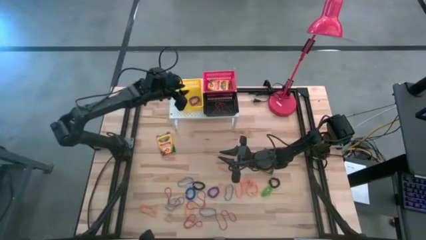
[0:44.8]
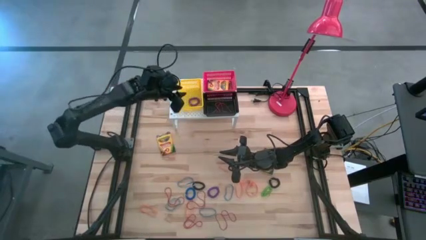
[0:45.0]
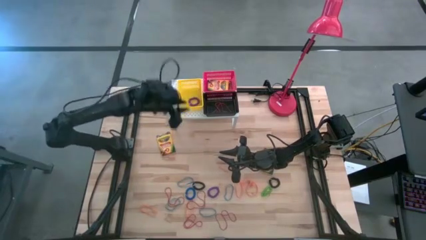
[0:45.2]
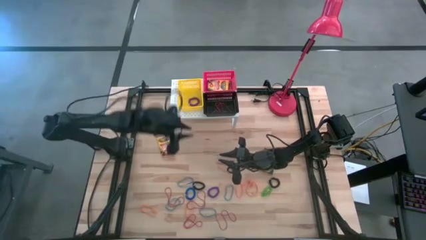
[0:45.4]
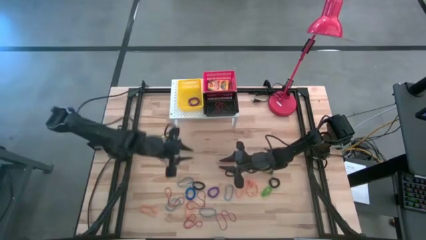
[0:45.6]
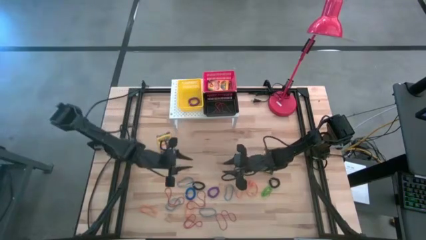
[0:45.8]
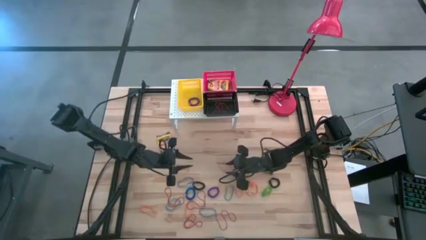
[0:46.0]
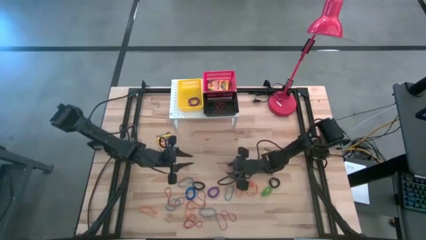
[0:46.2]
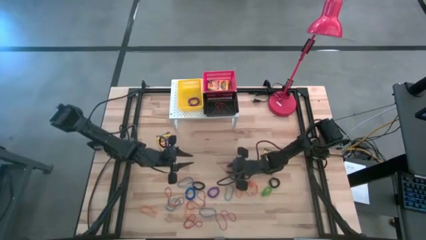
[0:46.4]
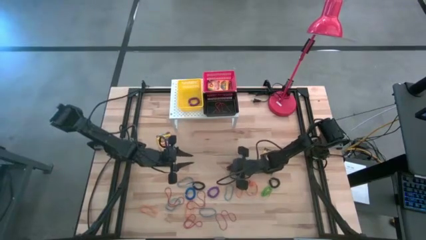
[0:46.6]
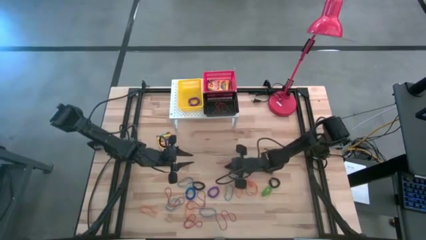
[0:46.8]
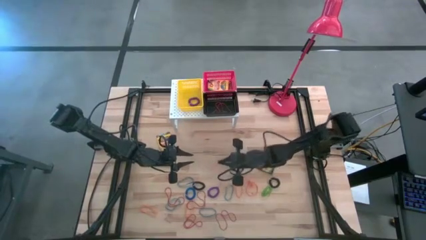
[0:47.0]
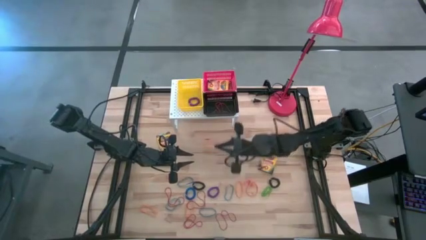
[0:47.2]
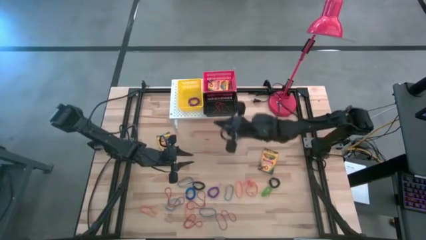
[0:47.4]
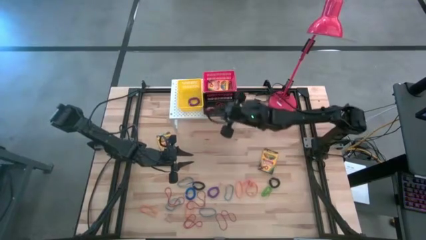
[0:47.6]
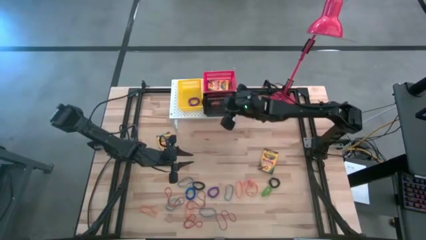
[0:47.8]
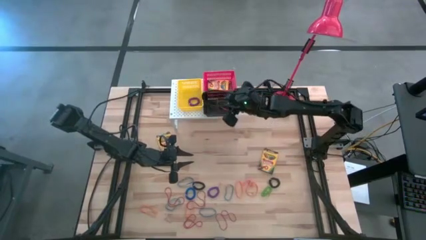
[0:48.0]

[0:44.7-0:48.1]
Task: Pick & Place Office Desk Supplies
Put the orange rubber band into the black bin on the shelf

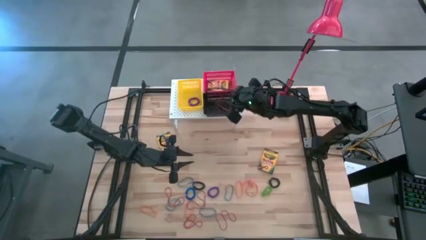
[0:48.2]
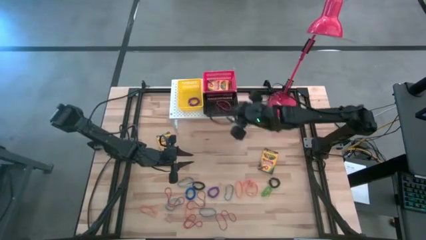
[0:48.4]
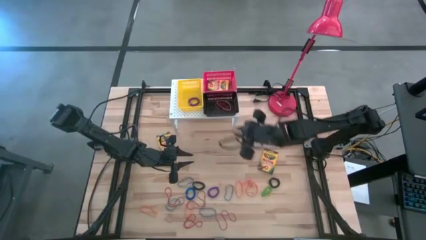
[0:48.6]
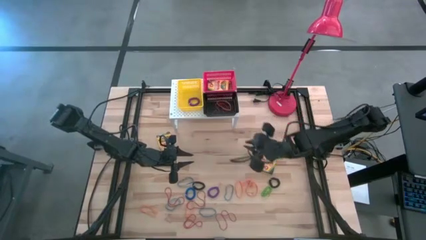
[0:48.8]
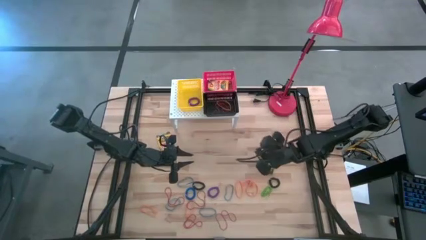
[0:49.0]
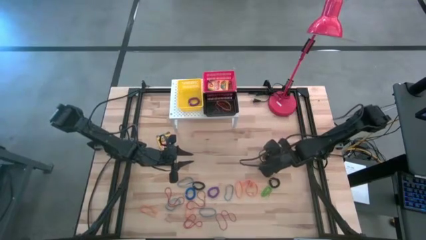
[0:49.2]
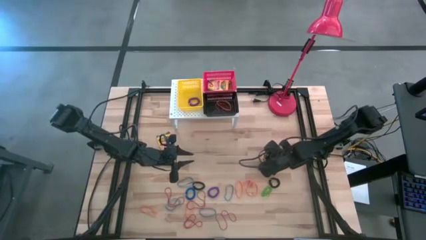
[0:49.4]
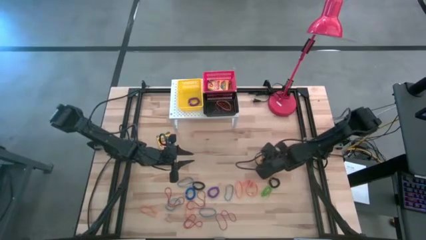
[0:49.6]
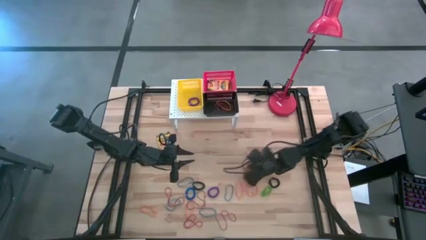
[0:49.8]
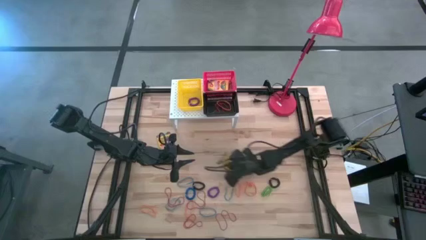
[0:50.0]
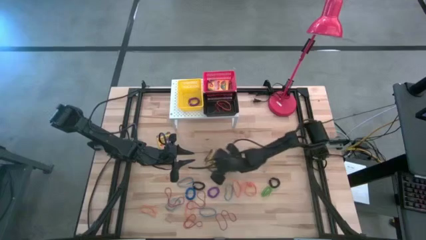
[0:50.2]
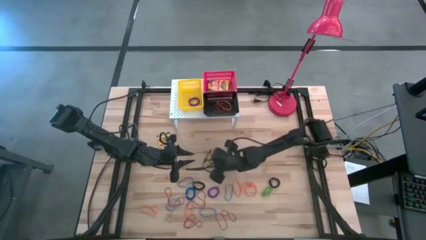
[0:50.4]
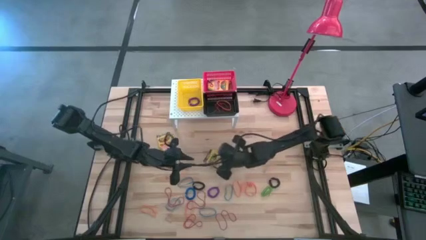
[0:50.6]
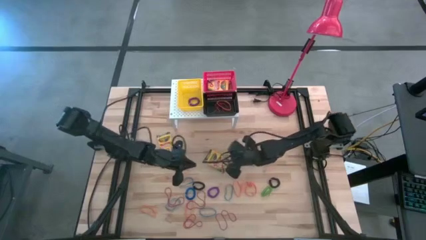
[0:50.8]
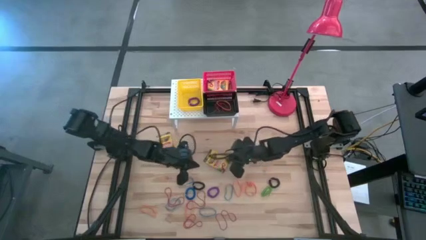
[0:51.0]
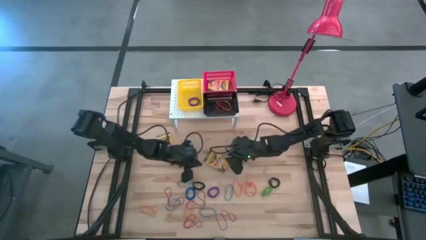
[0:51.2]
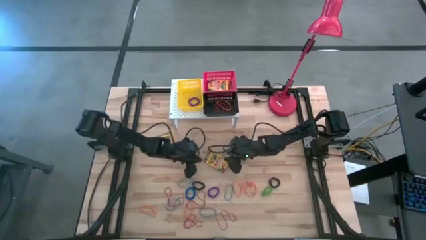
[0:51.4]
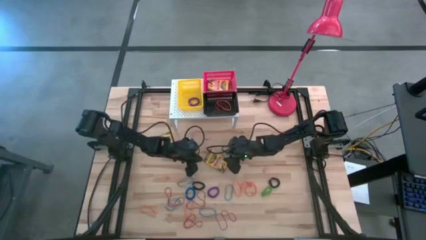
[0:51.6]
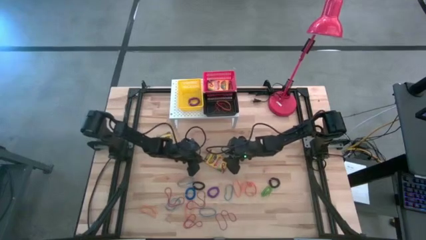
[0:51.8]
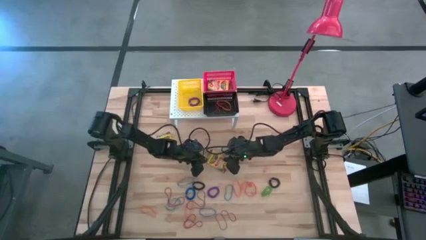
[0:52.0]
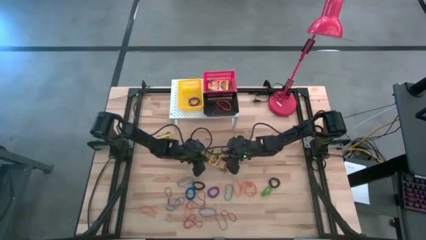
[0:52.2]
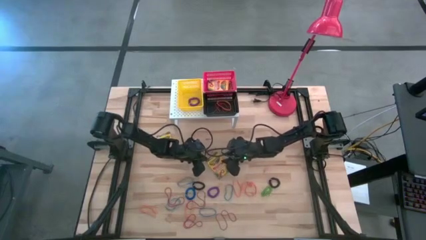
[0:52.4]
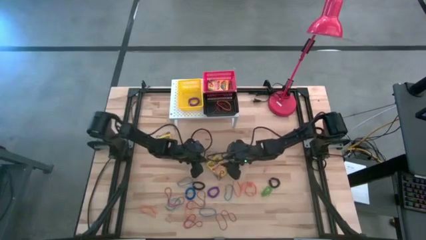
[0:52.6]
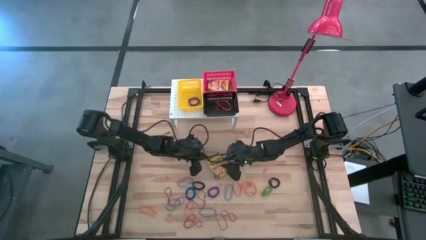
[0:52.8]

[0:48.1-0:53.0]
Put the yellow crayon box into the red bin on the shelf

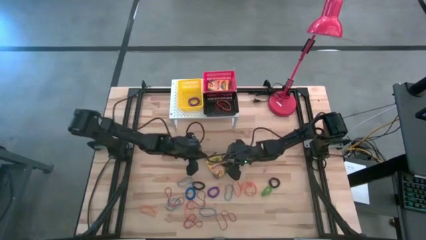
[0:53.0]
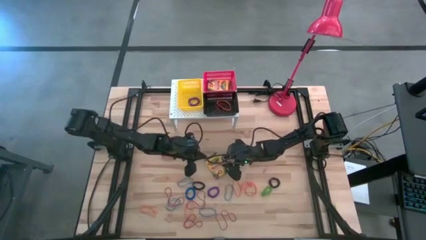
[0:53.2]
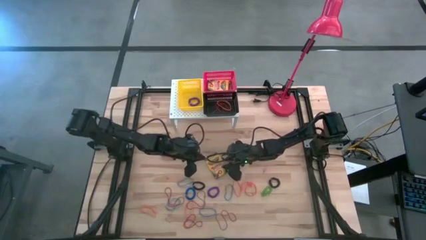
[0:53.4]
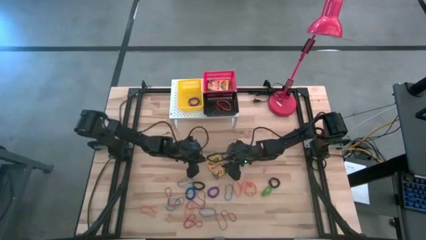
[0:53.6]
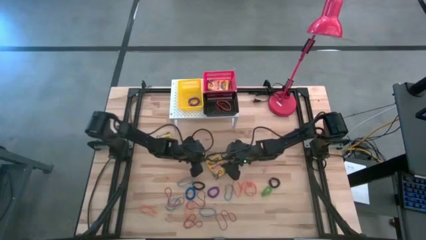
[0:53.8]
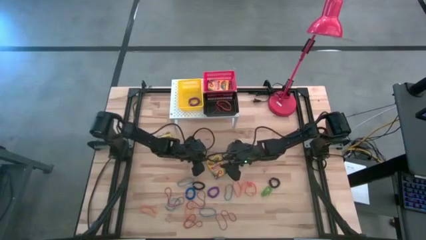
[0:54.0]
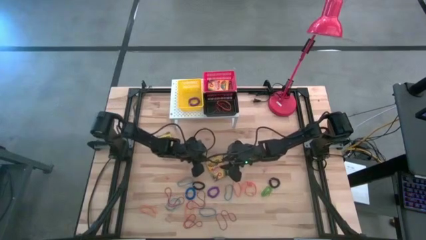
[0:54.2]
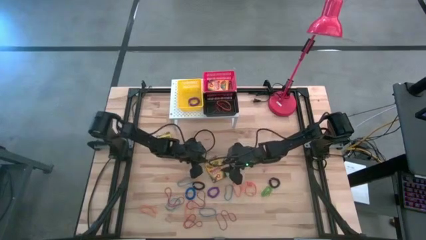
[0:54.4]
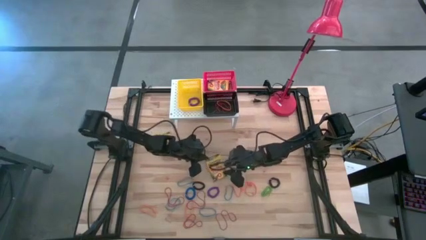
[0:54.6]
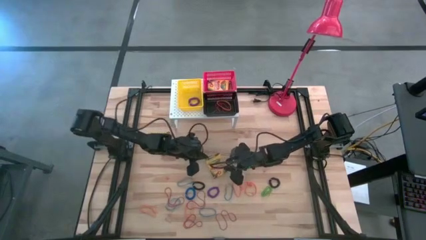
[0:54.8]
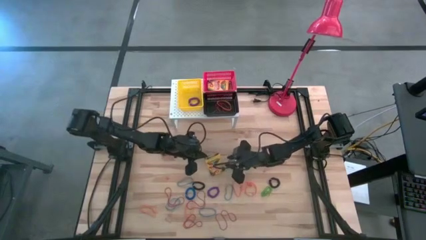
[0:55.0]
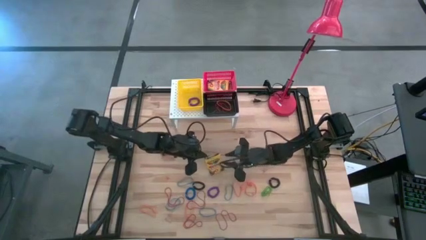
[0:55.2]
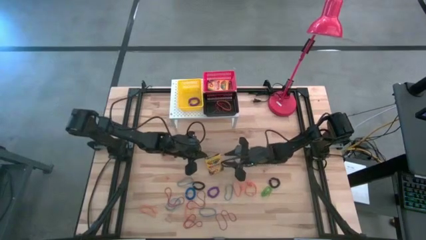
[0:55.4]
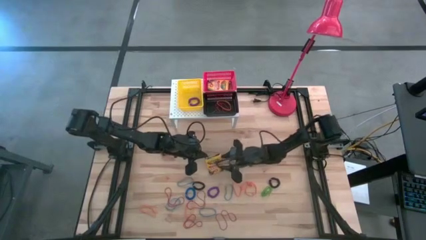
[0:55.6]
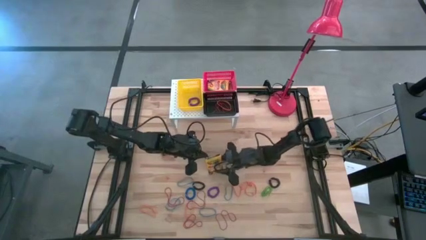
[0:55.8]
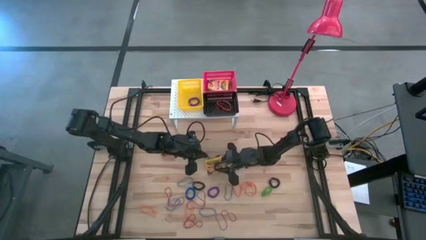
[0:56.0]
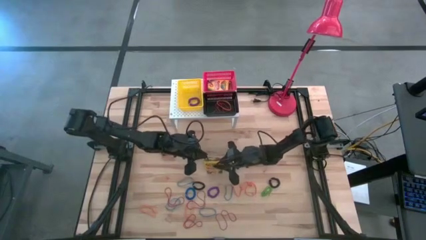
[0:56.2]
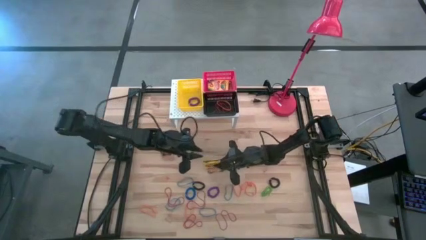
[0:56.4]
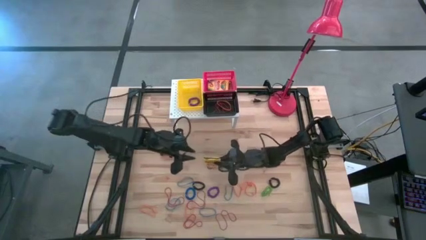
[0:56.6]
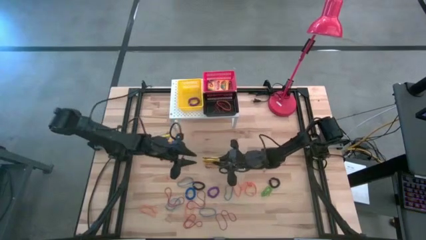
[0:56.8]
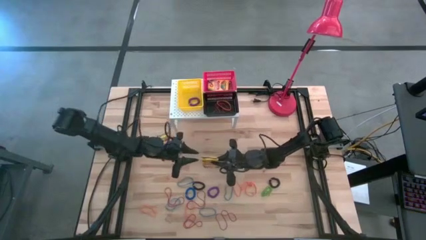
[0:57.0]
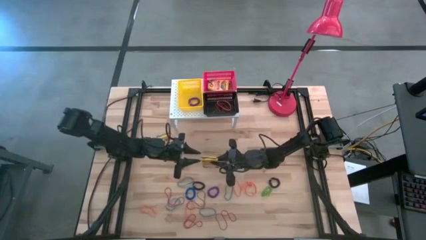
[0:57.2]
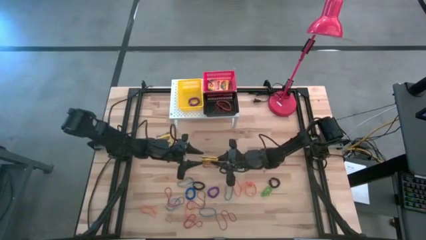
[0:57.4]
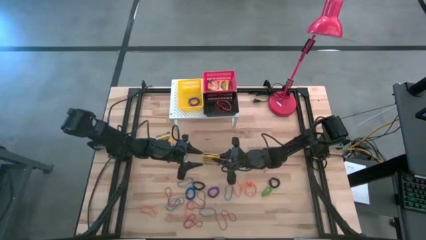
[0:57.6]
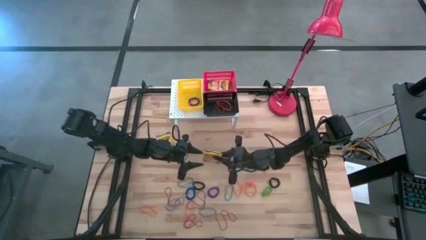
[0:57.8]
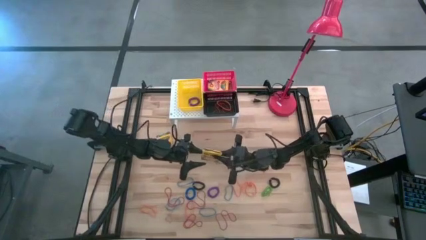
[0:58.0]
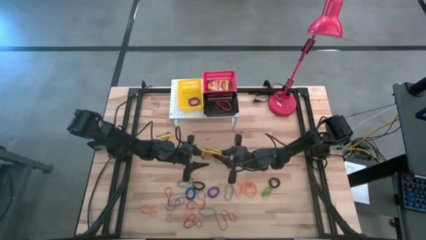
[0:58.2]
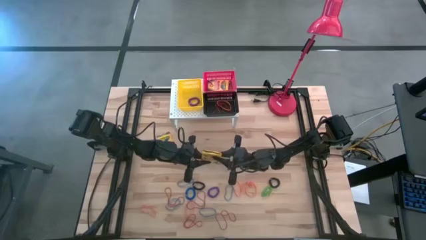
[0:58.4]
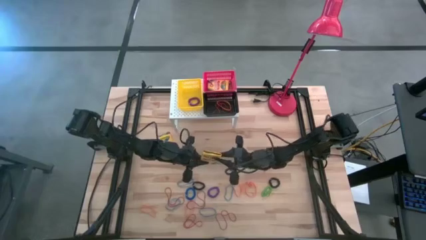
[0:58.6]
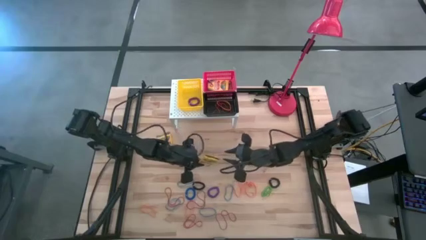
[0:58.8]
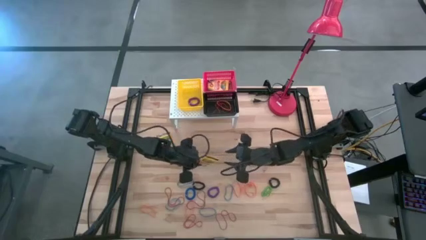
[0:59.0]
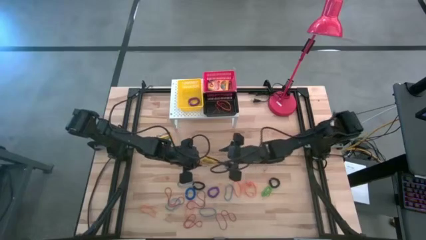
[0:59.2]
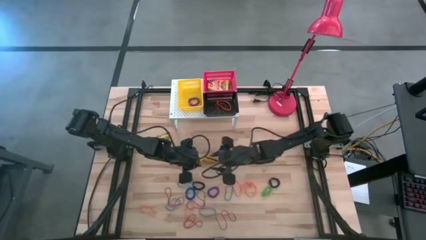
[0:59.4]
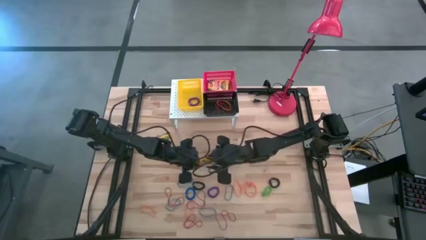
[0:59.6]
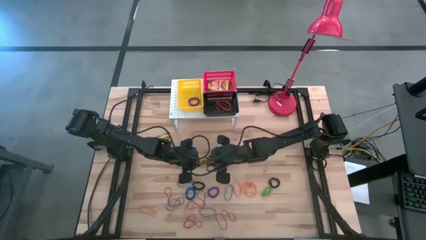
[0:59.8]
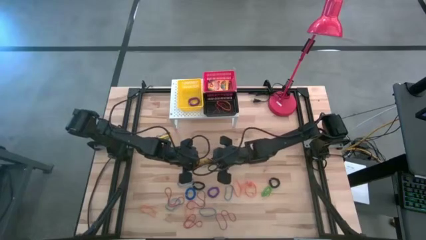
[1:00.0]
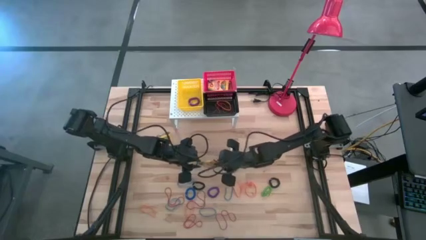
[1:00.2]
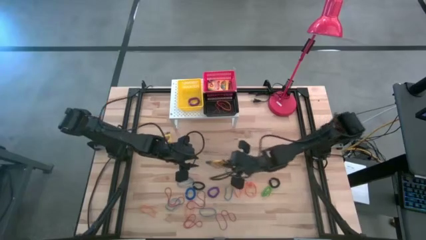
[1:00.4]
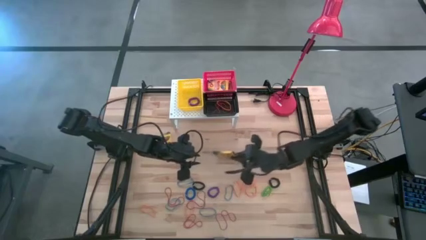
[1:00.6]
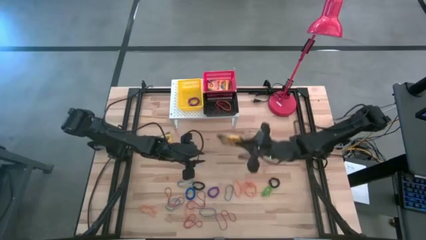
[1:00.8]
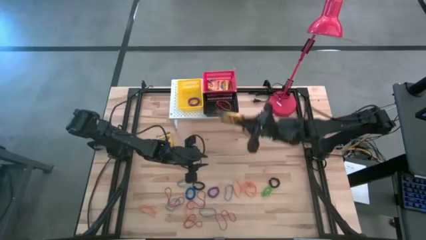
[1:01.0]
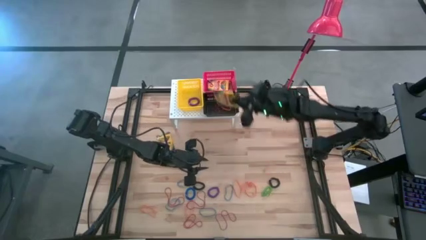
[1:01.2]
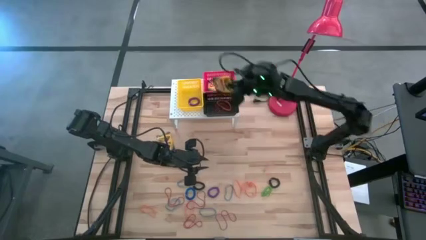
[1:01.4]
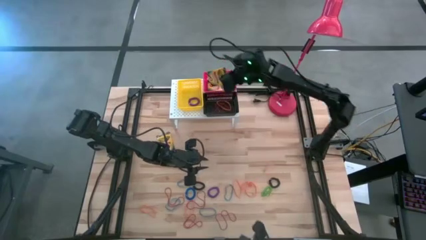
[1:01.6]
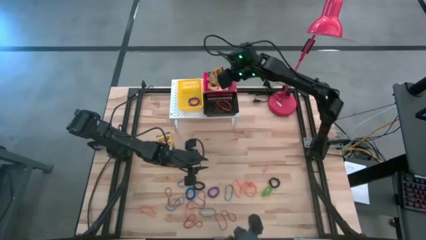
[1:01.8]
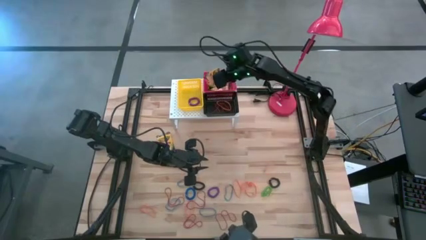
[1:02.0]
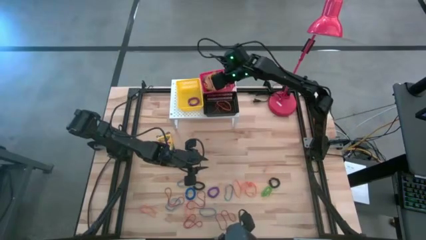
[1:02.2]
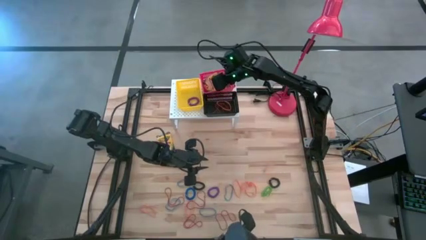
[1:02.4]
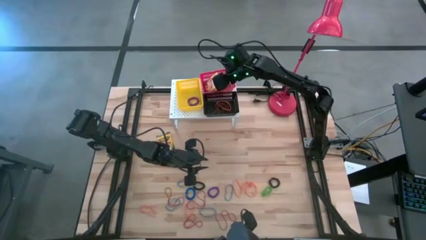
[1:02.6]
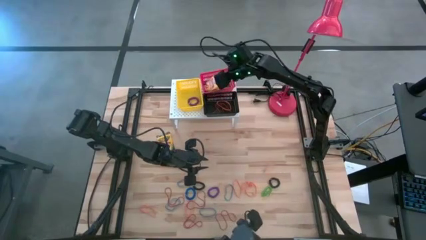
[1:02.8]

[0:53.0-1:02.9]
Put the yellow crayon box into the red bin on the shelf

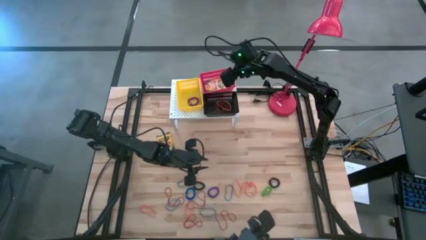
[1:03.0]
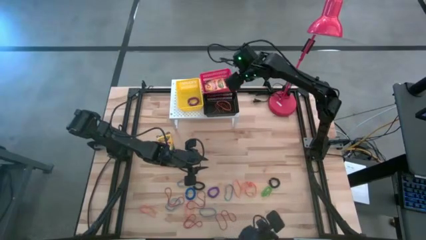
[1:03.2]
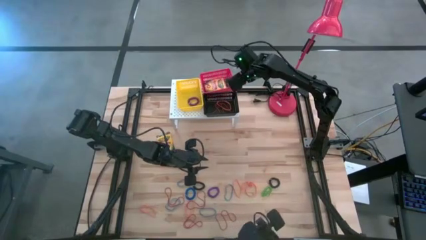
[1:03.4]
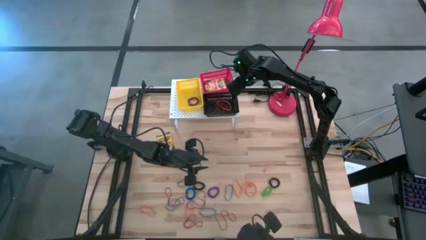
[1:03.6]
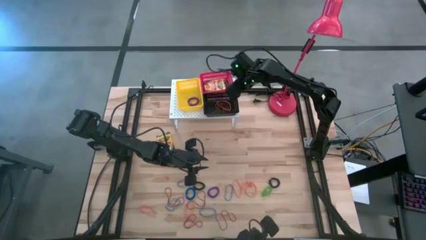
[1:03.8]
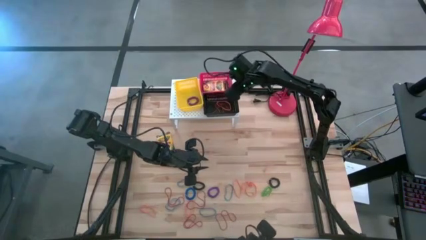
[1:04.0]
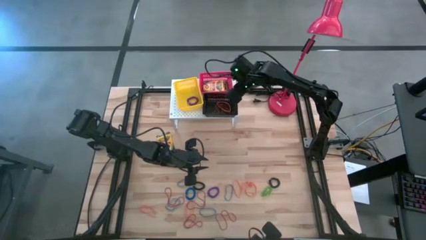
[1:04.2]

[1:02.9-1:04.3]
Adjust the red bin on the shelf
